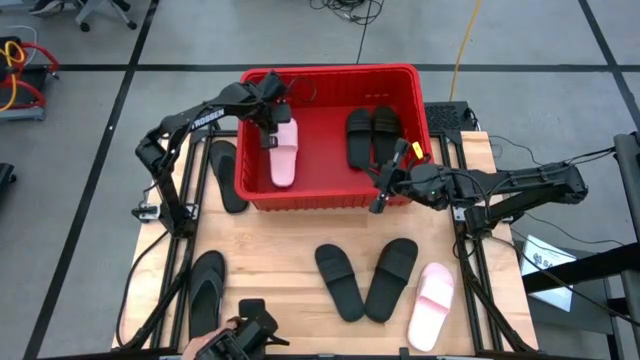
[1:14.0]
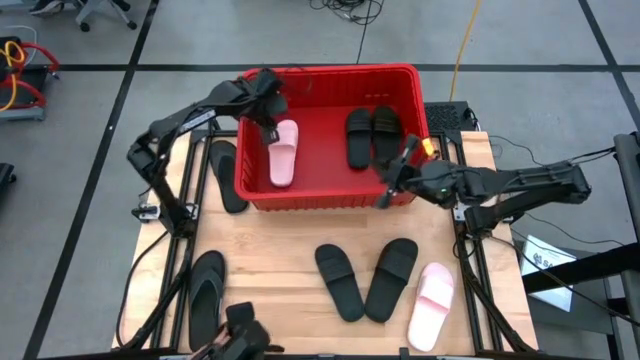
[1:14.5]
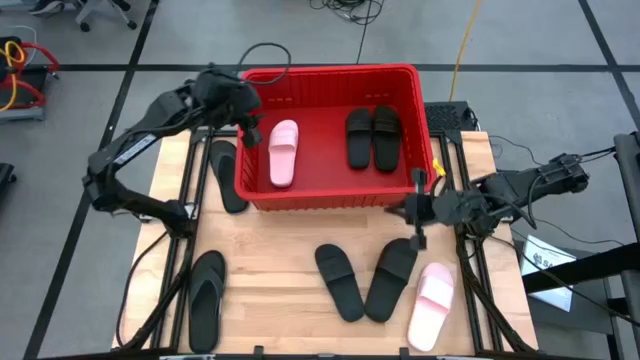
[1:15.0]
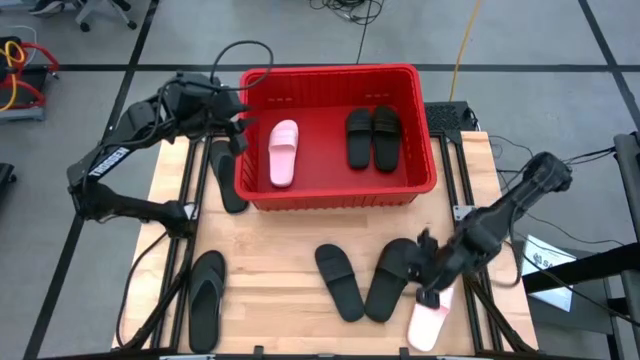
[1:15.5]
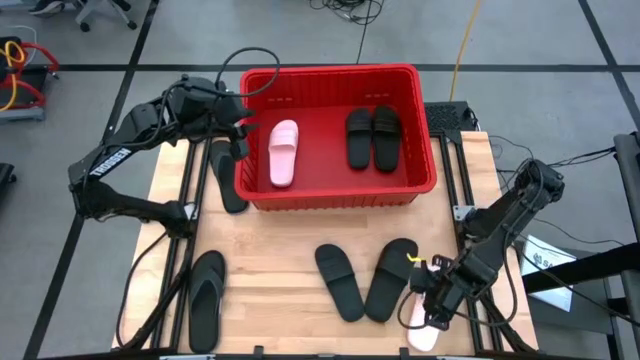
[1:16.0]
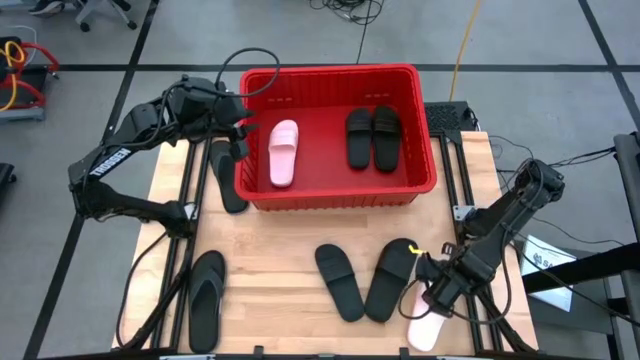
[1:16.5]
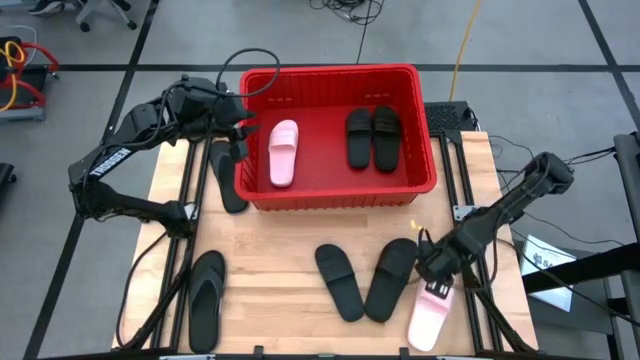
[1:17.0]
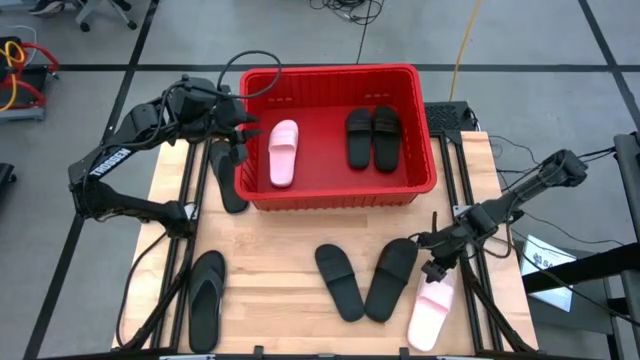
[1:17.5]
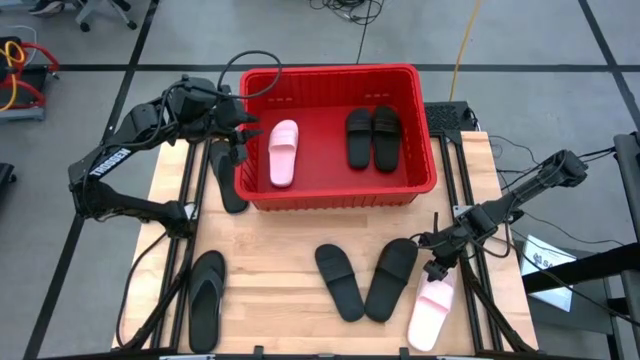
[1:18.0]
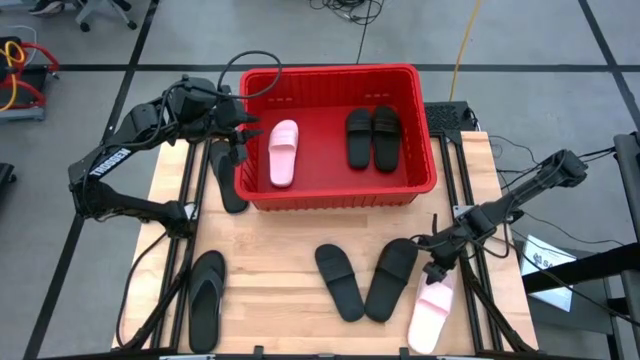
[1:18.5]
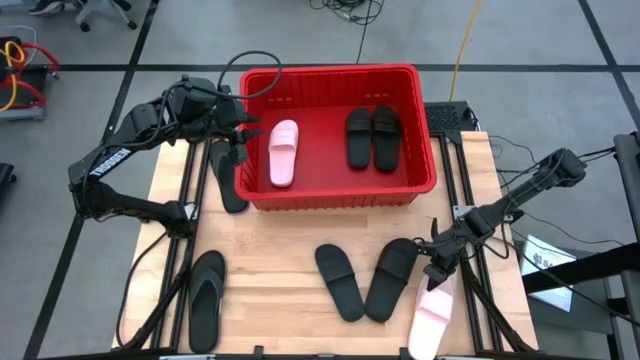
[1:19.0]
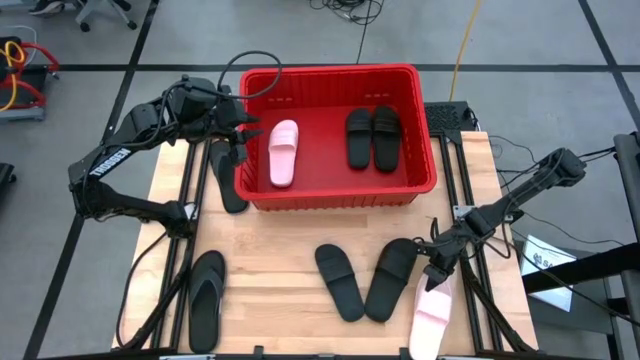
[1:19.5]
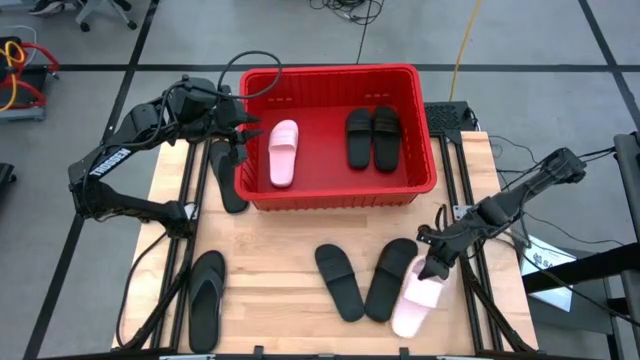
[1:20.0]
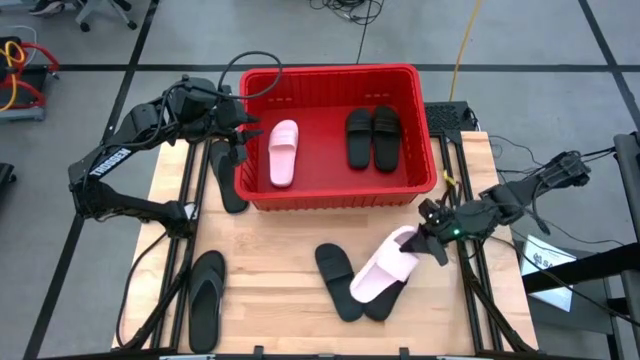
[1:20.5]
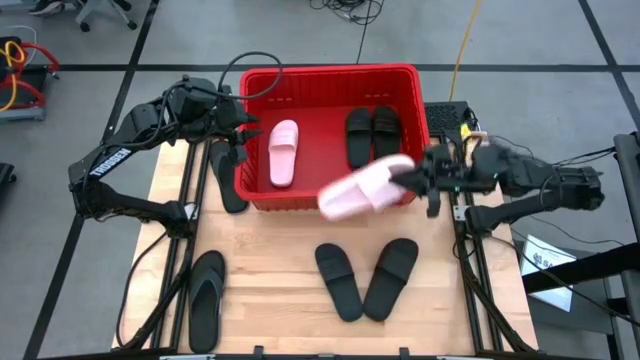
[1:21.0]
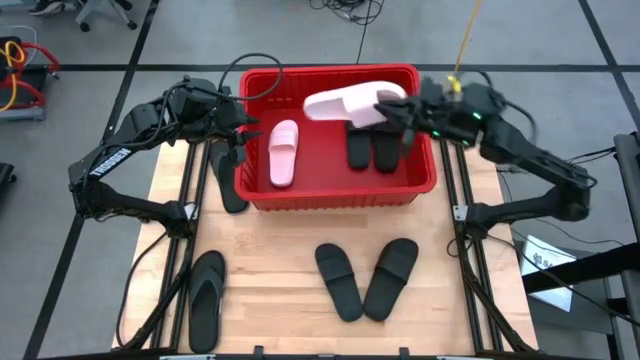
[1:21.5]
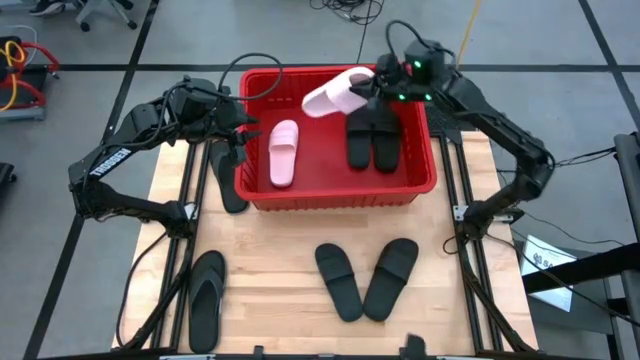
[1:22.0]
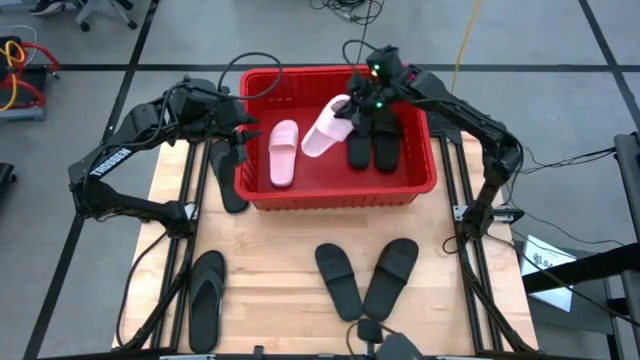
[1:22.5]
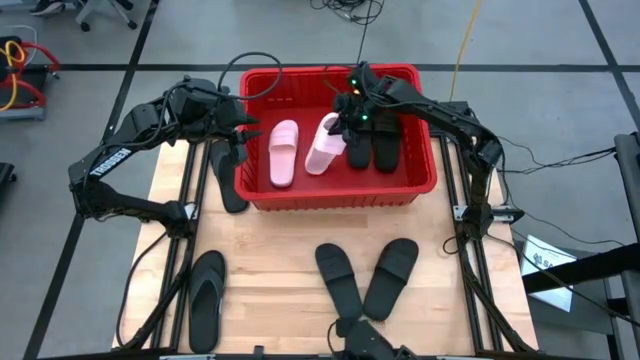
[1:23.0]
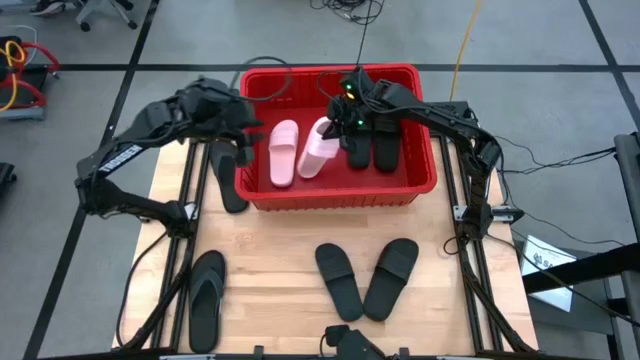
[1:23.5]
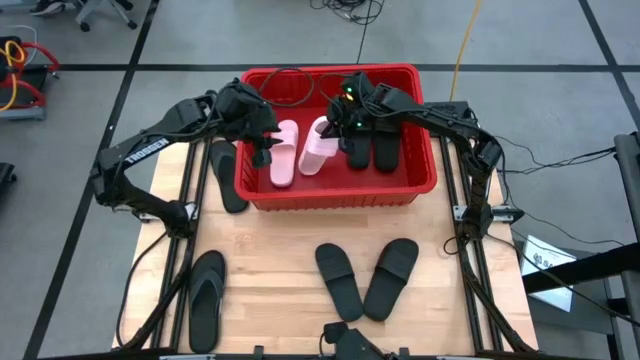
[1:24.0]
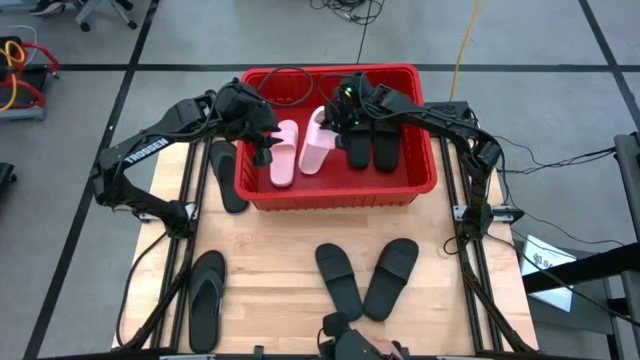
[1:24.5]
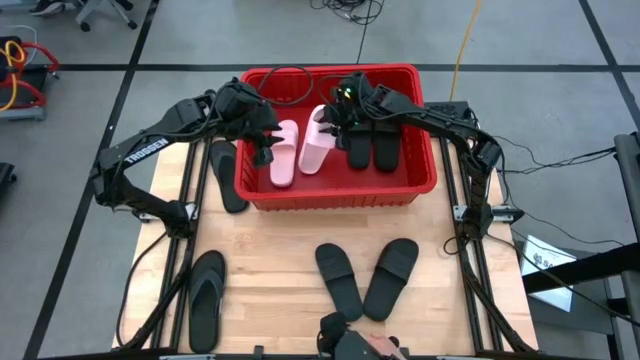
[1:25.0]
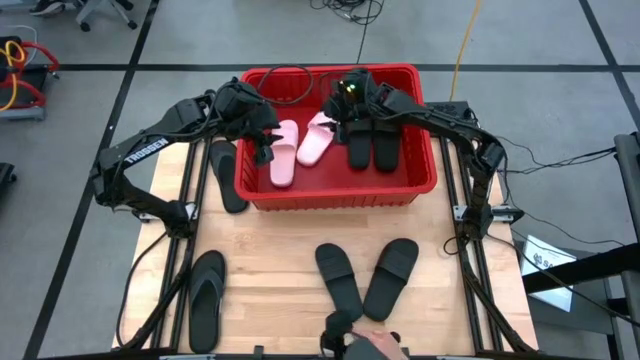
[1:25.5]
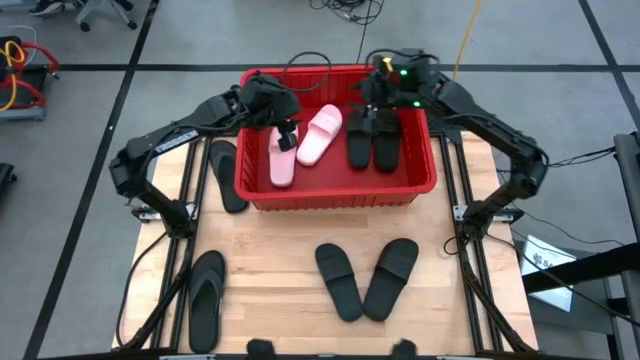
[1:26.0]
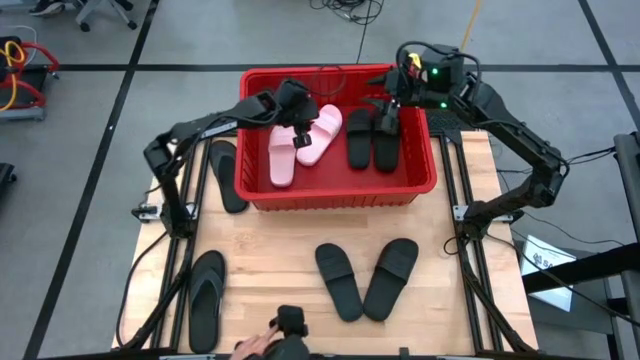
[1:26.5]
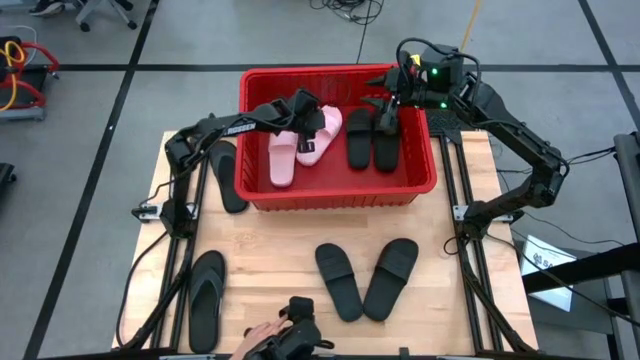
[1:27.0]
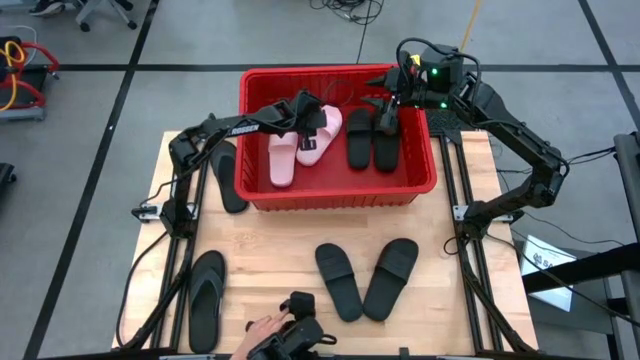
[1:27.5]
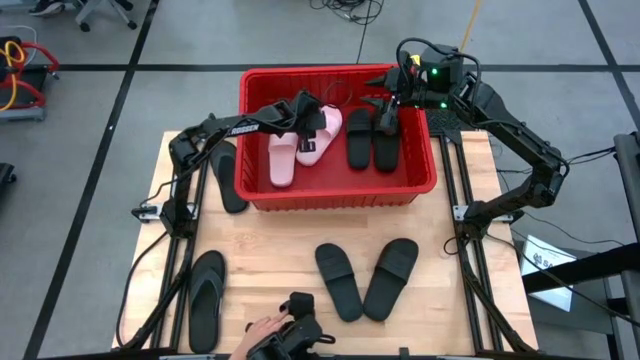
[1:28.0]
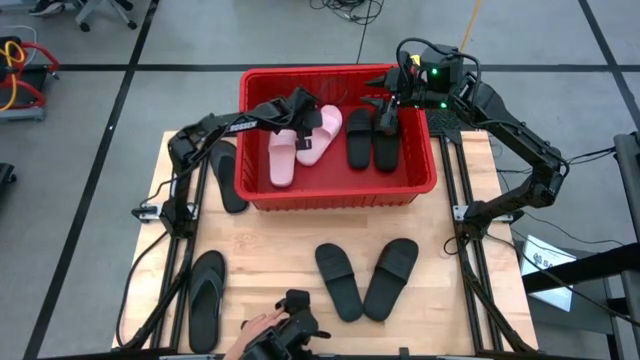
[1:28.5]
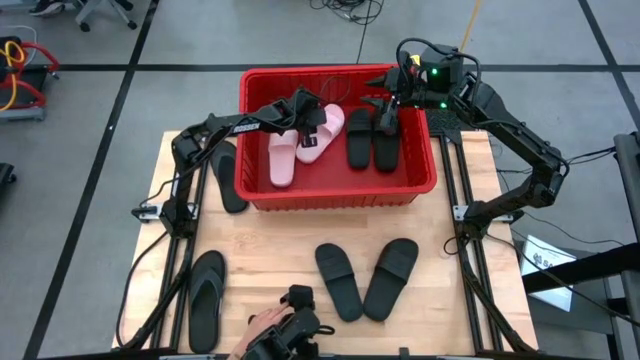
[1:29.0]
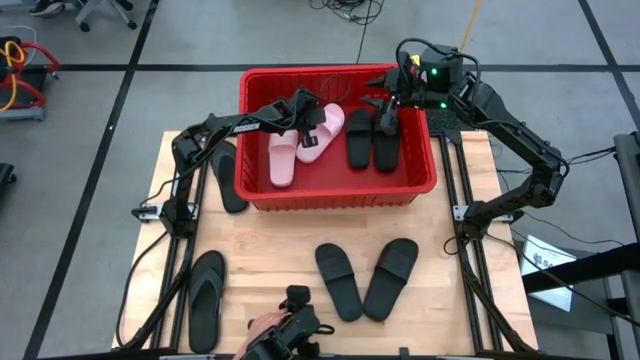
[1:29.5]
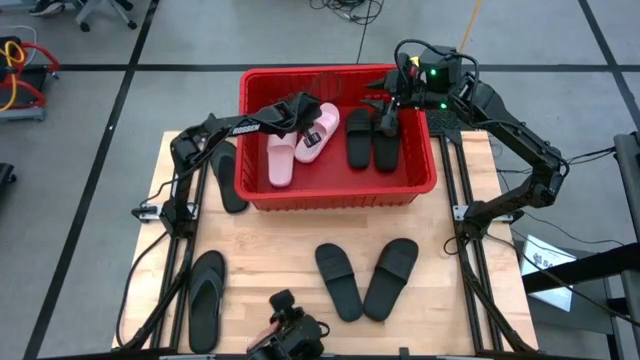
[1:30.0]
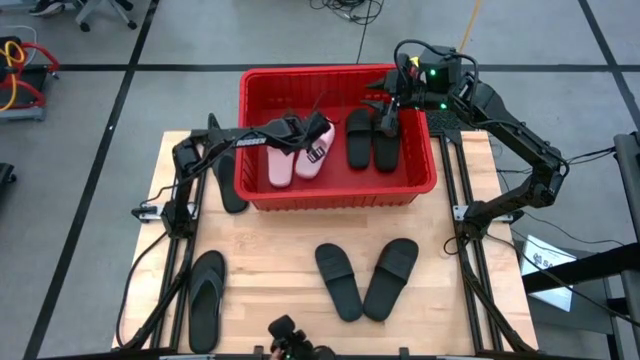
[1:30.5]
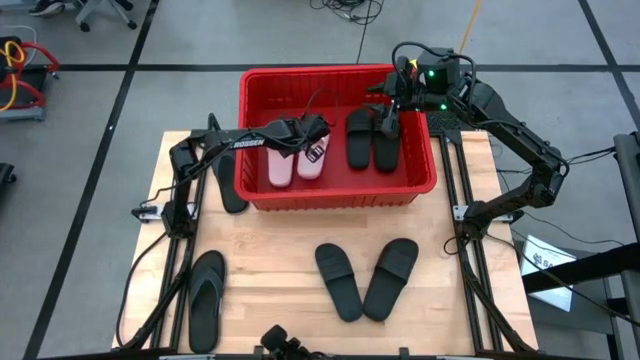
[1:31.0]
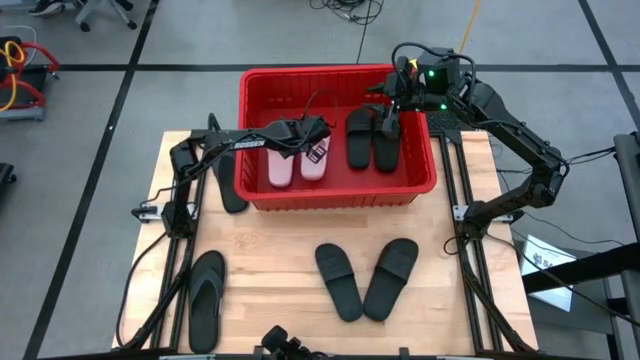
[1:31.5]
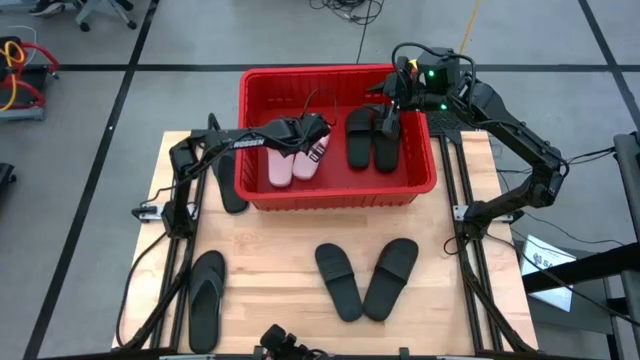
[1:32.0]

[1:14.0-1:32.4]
Task: Pick and place slides into bin
Put the pink slide into the red bin

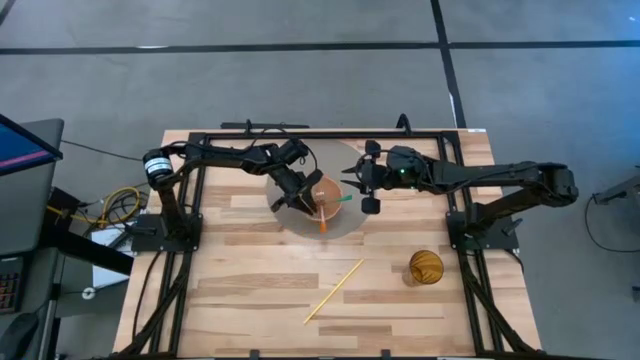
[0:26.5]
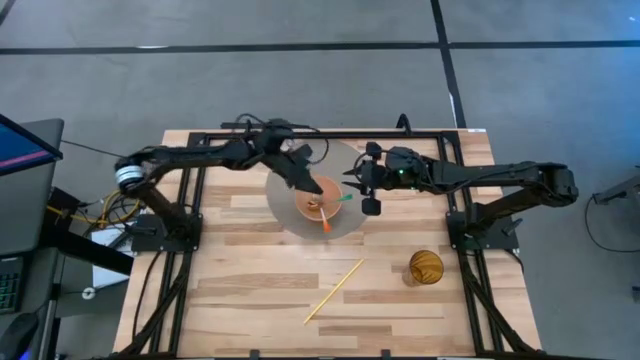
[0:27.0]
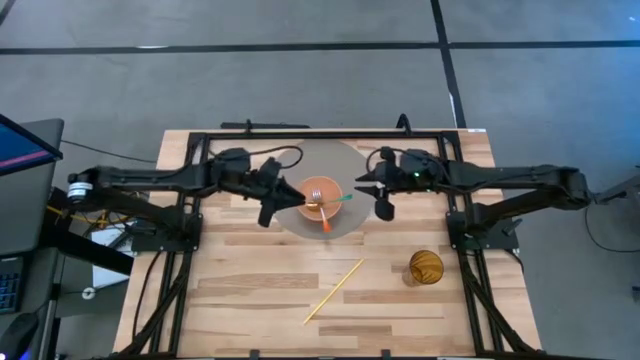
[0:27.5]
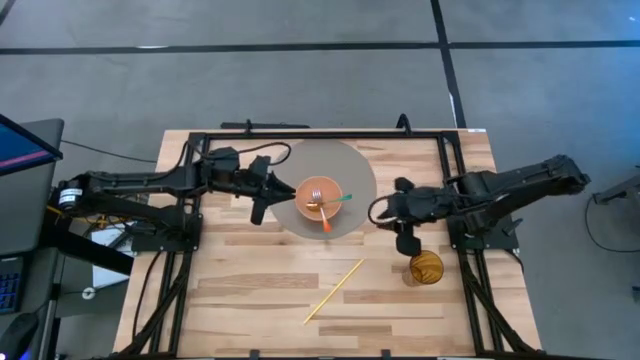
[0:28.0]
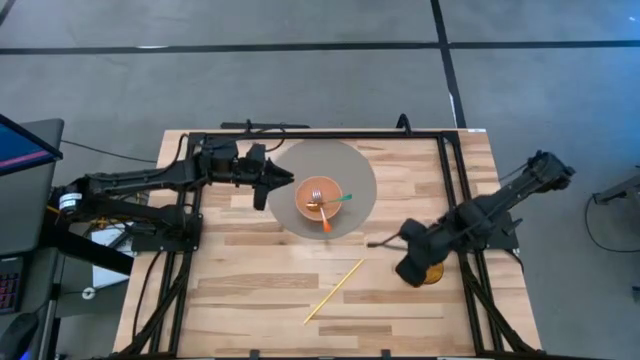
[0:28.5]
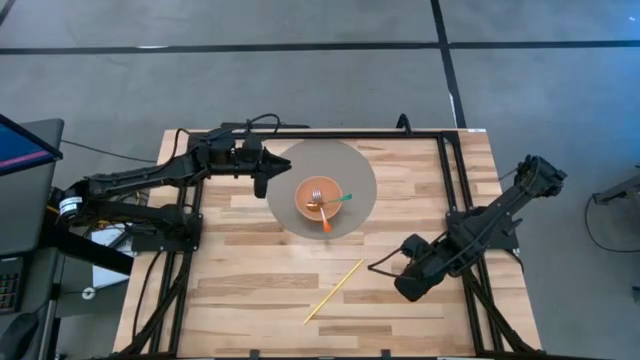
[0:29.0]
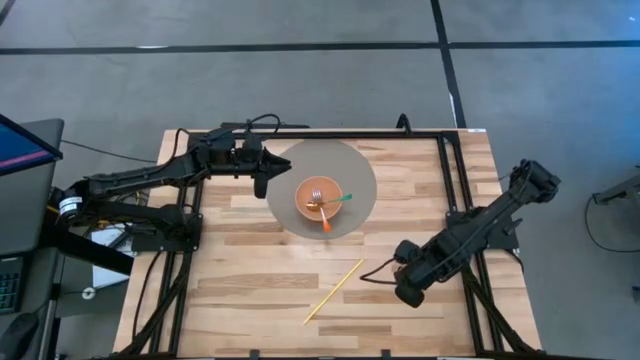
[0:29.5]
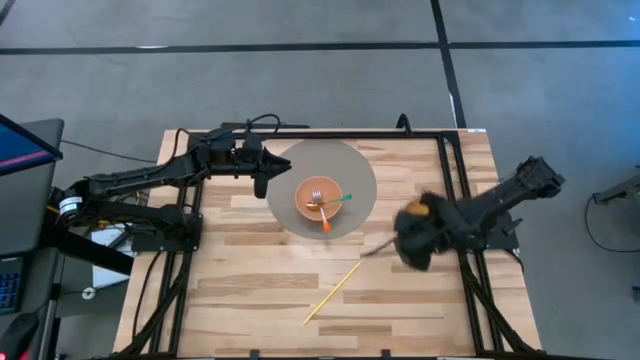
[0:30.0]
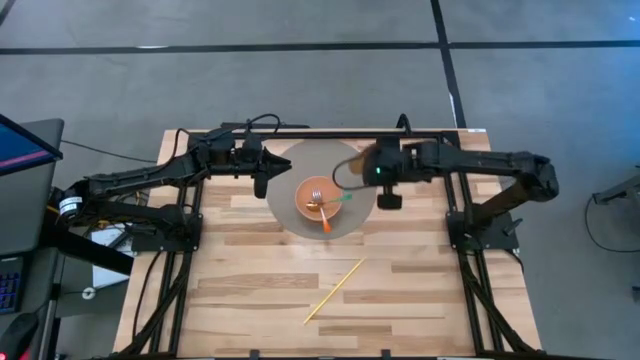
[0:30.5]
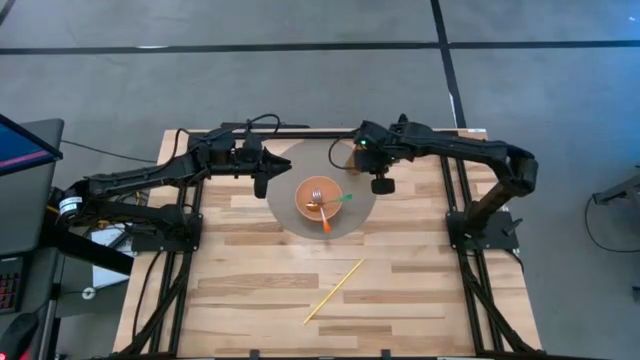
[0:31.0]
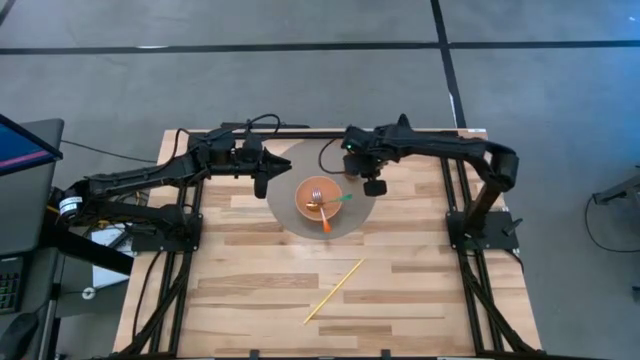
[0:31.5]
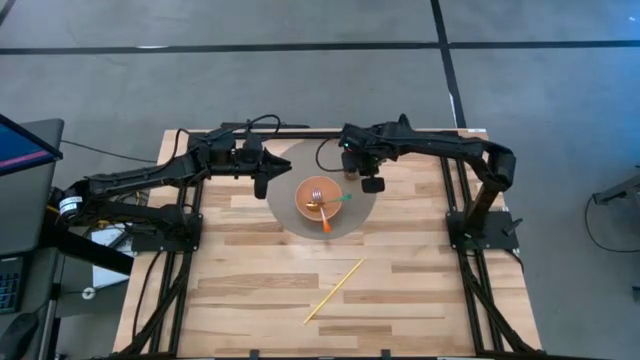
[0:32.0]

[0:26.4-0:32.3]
Task: Pick & Place Utensil
Put the brown cup to the right side of the orange bowl on the gray table placemat
